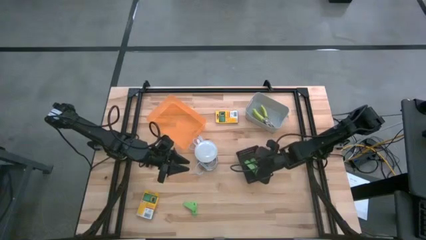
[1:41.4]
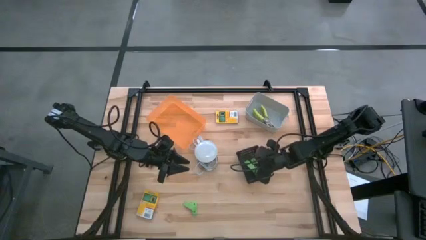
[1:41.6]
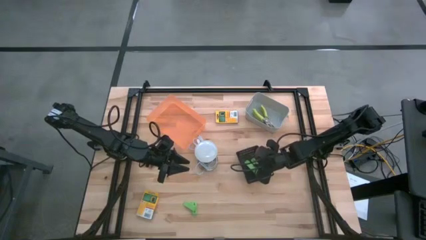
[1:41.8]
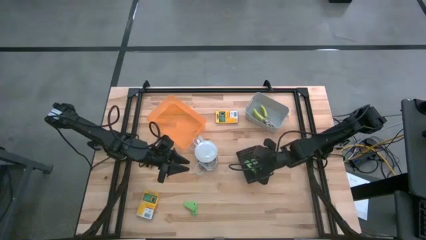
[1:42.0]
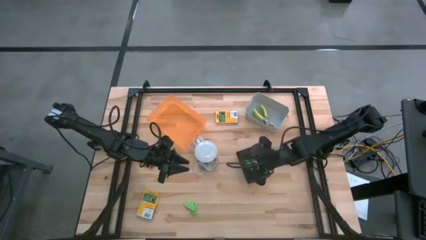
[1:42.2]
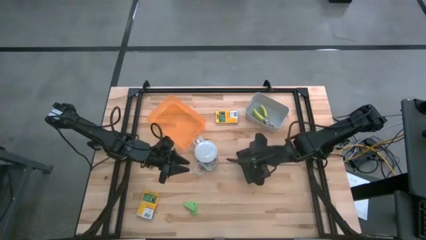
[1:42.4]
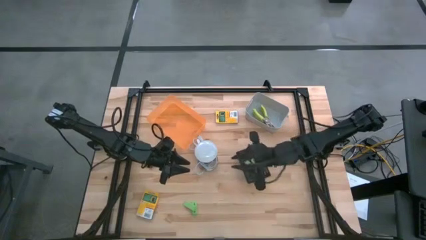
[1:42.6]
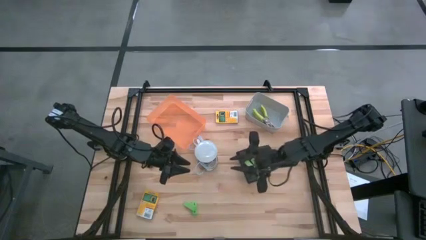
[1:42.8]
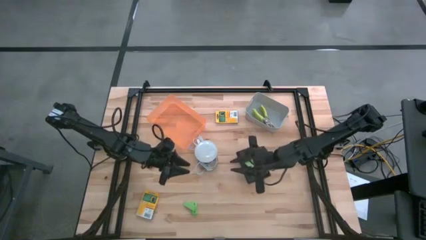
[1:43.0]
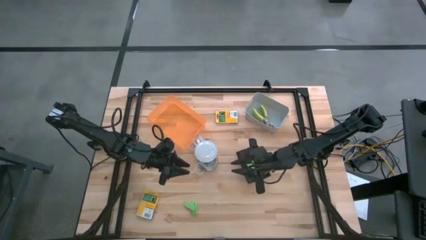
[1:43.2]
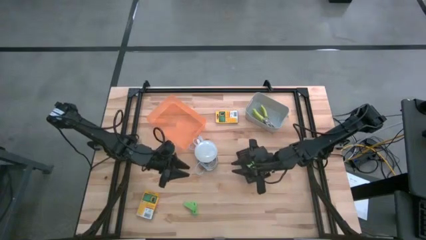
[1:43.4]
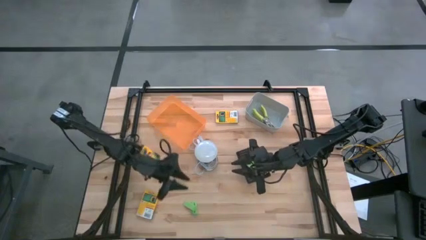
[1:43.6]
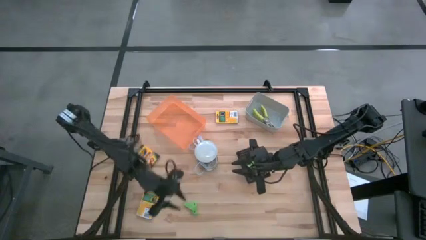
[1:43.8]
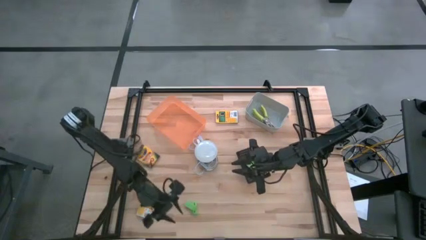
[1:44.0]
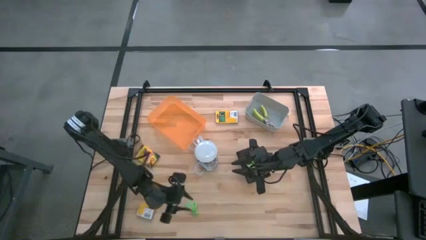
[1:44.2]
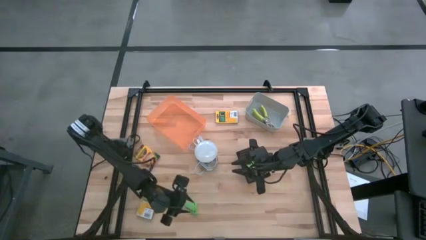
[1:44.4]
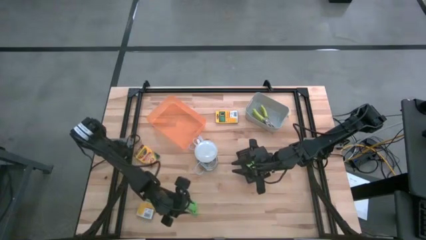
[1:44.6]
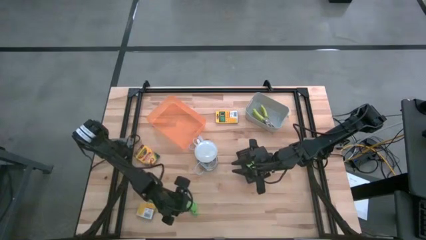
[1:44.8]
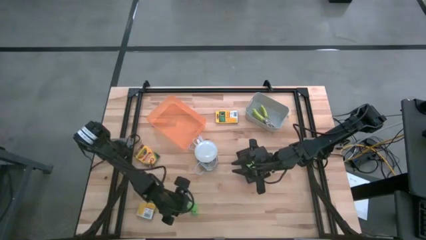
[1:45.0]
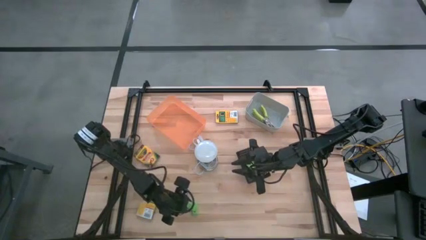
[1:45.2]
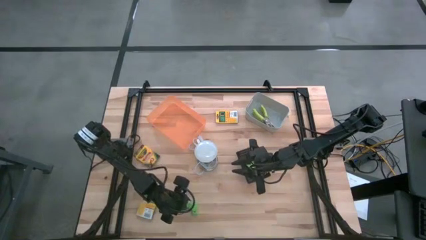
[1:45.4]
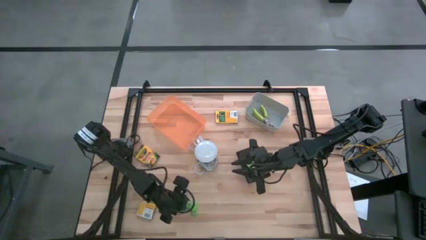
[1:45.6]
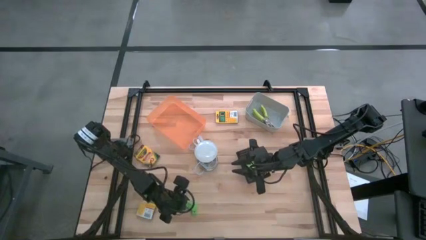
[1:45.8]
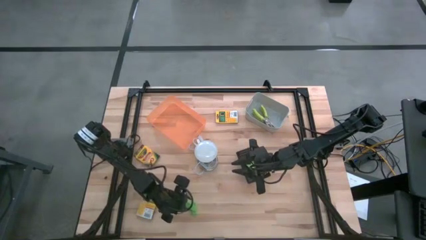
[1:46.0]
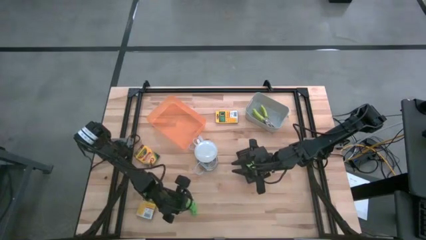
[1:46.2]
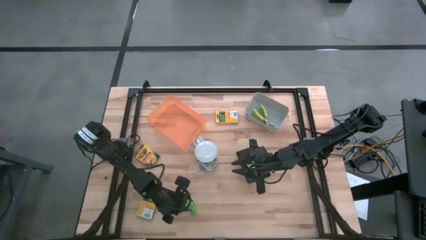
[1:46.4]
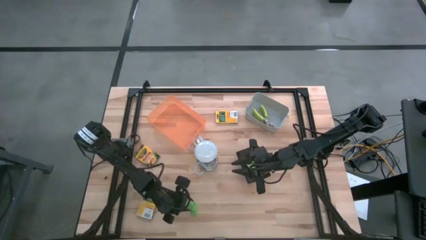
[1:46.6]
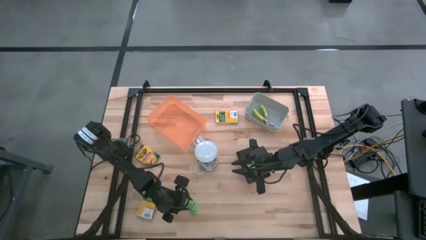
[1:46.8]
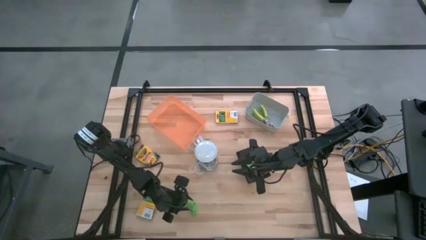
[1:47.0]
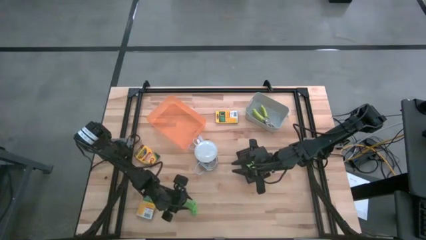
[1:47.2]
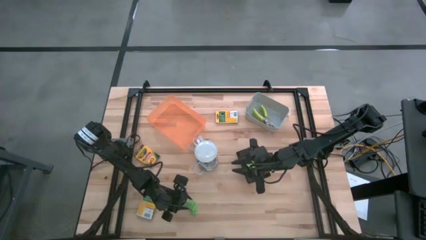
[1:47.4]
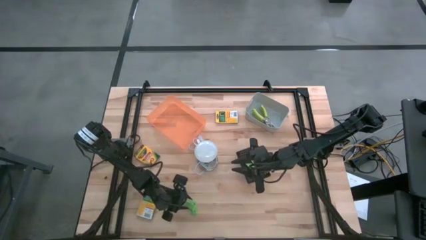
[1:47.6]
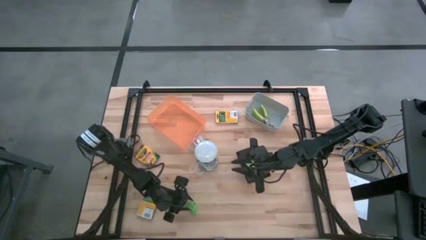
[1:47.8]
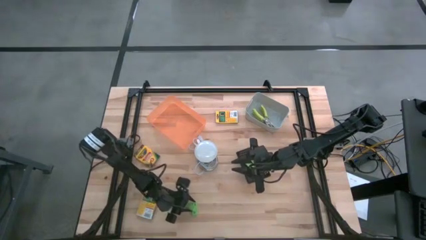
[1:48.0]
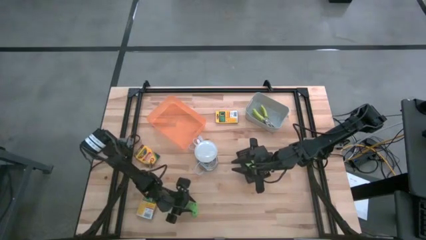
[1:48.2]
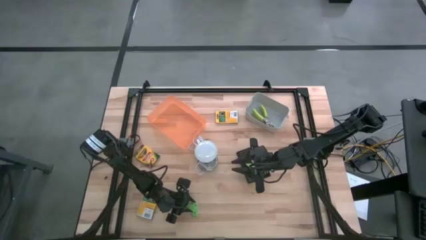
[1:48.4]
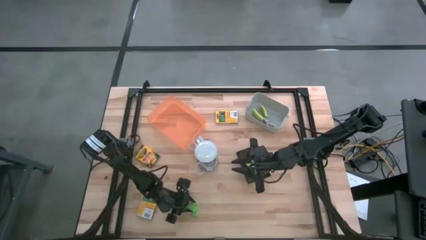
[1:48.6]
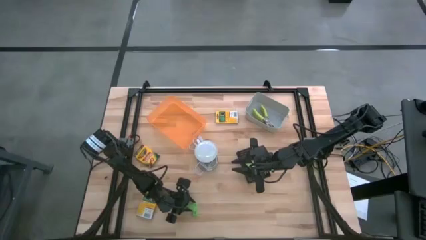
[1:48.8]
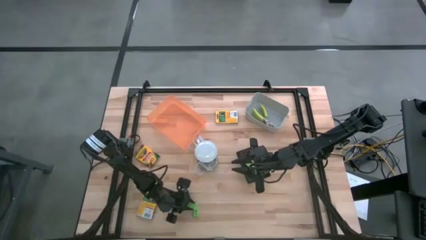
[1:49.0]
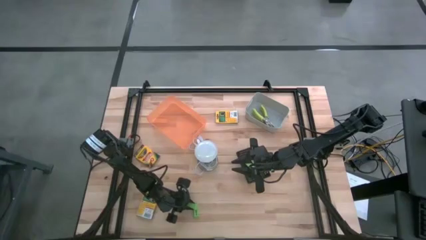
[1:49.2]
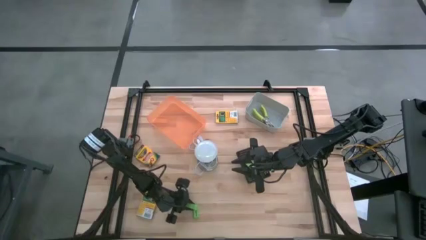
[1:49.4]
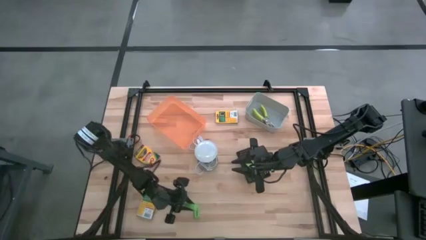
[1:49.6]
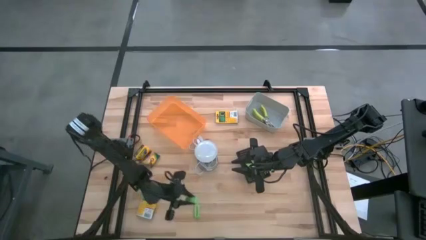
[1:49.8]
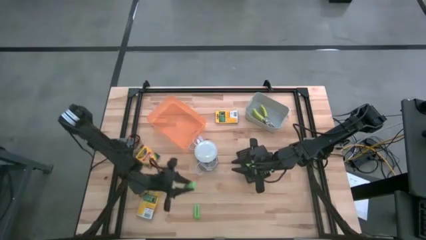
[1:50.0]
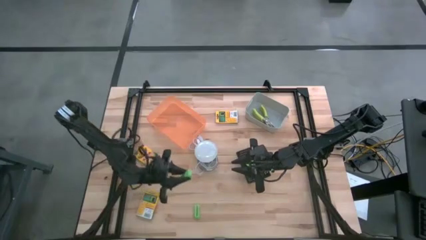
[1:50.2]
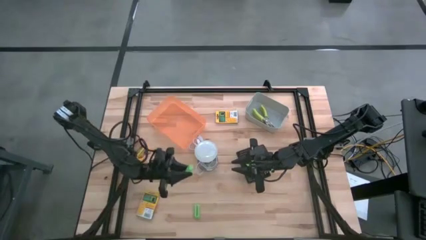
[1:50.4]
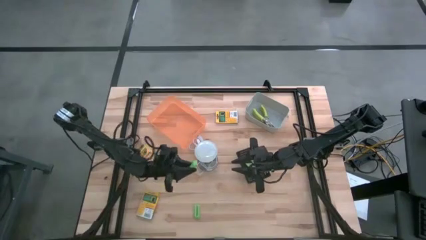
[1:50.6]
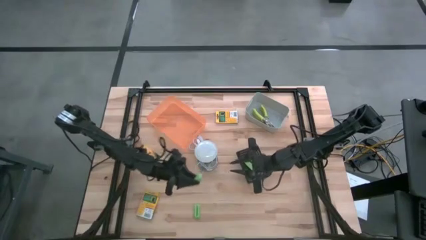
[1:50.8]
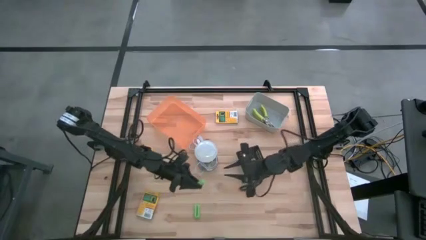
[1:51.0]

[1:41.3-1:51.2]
Task: Pick & Place School Supplies
Put the green eraser into the black bin

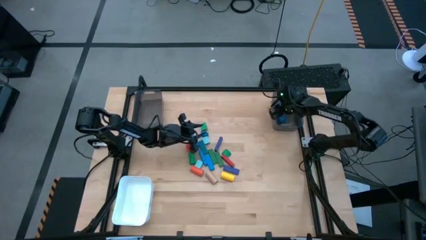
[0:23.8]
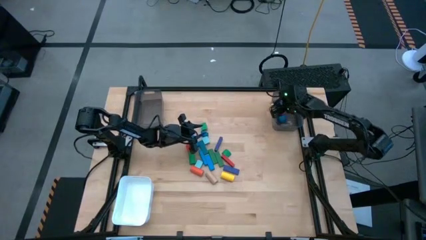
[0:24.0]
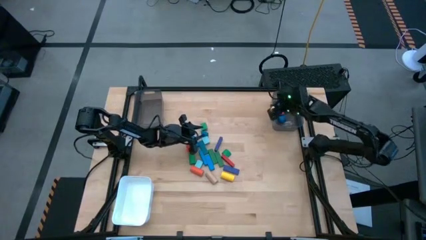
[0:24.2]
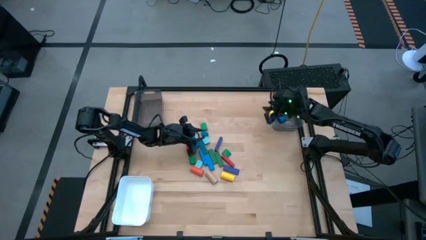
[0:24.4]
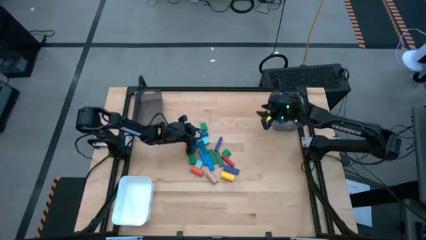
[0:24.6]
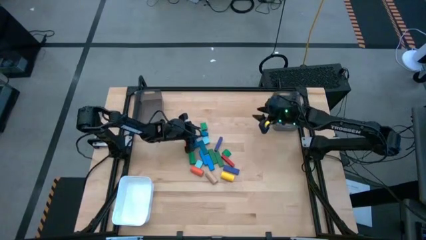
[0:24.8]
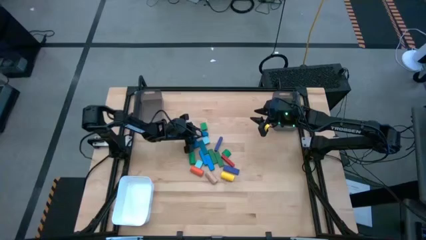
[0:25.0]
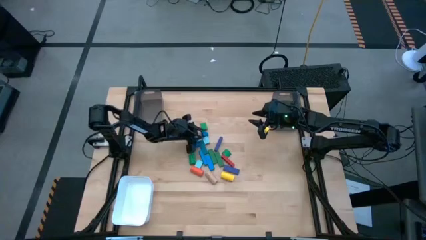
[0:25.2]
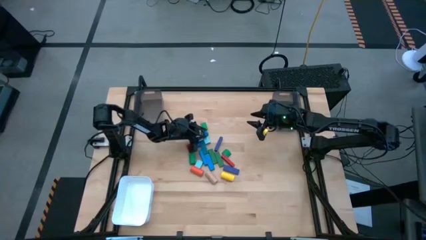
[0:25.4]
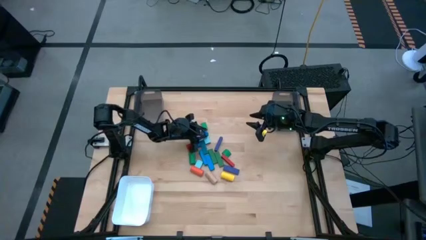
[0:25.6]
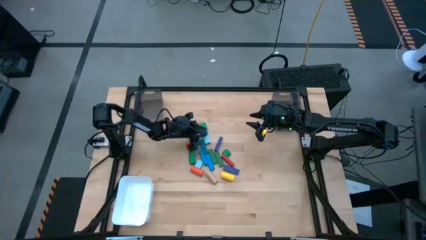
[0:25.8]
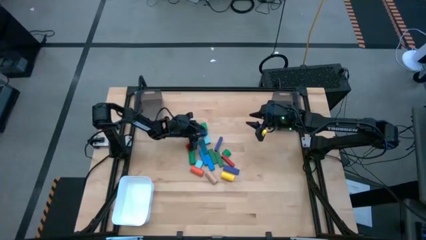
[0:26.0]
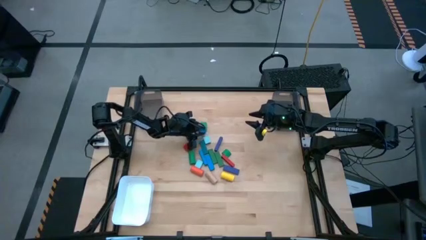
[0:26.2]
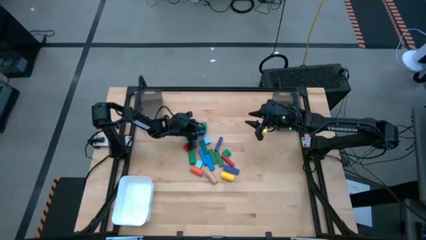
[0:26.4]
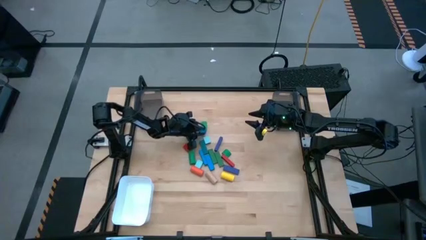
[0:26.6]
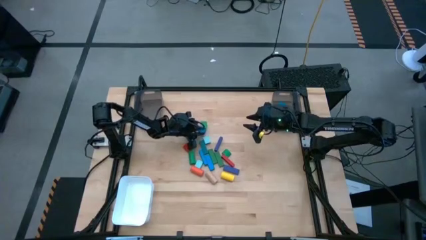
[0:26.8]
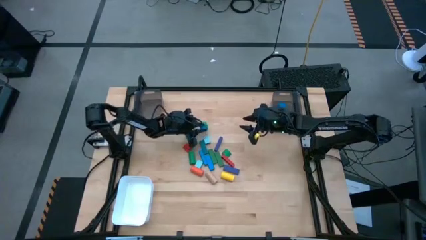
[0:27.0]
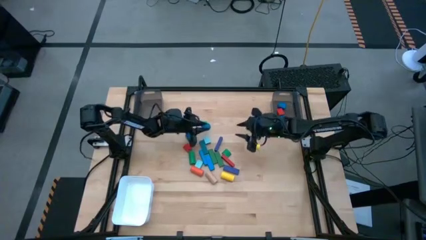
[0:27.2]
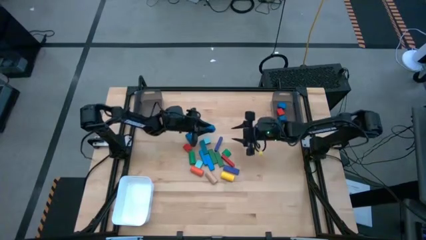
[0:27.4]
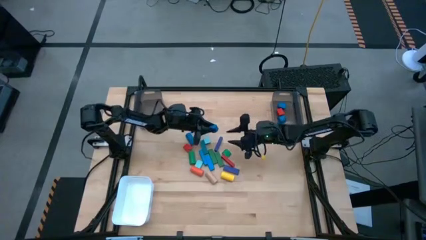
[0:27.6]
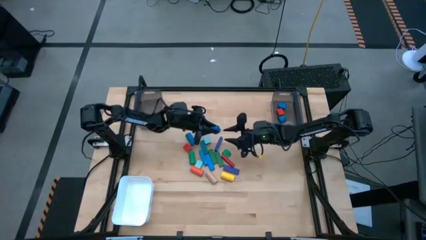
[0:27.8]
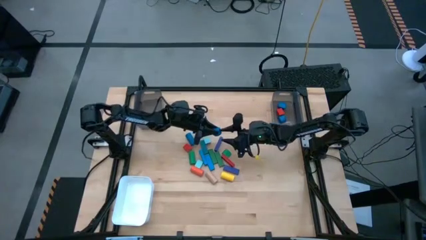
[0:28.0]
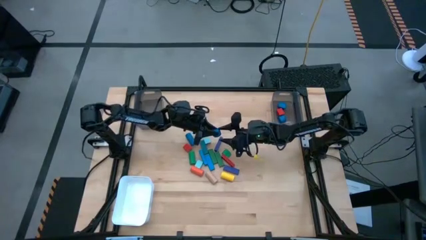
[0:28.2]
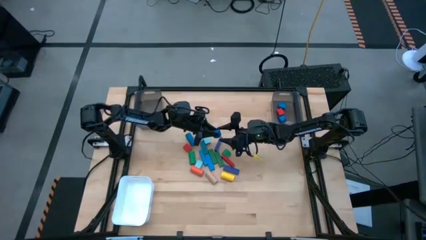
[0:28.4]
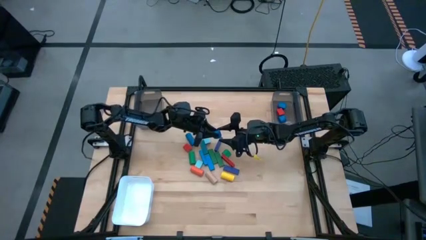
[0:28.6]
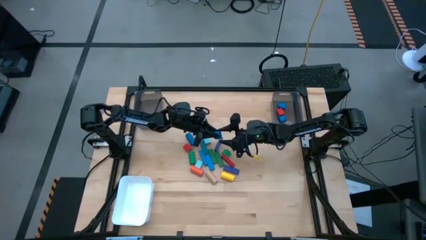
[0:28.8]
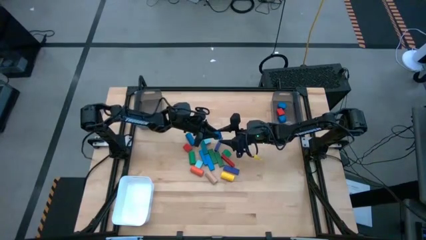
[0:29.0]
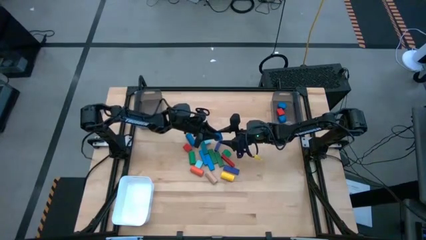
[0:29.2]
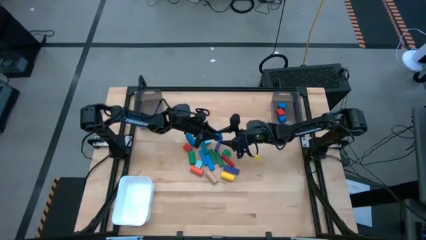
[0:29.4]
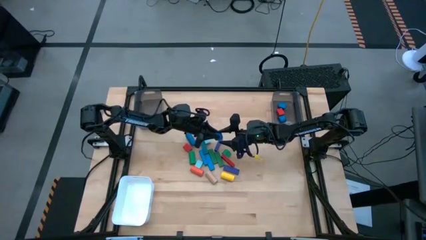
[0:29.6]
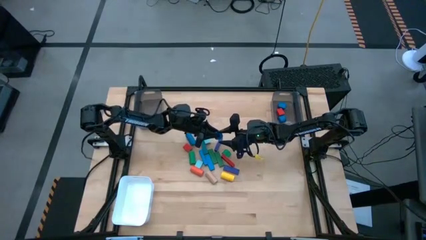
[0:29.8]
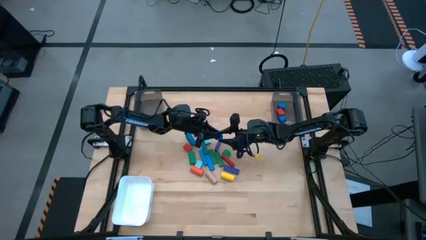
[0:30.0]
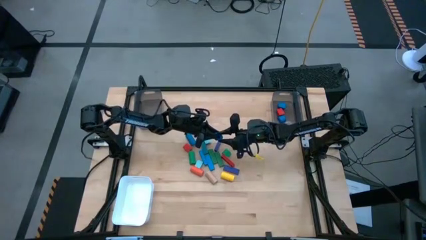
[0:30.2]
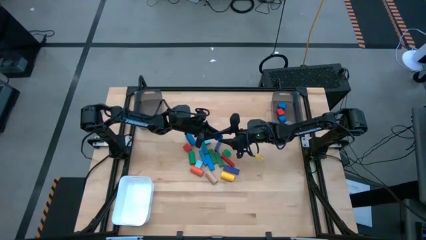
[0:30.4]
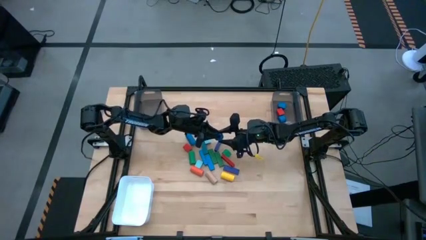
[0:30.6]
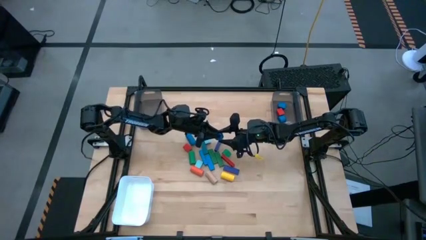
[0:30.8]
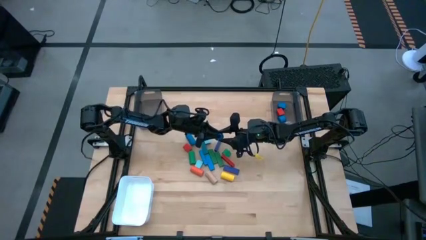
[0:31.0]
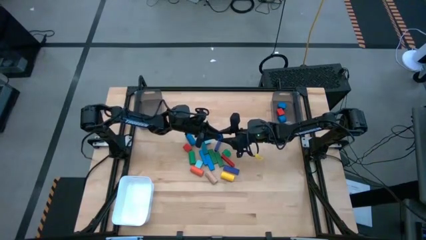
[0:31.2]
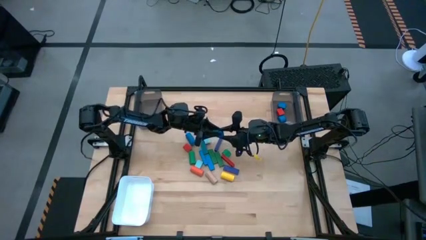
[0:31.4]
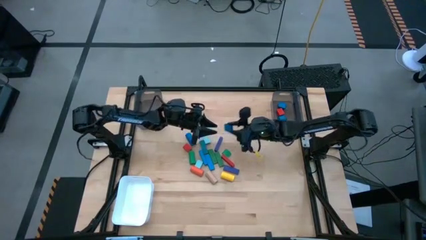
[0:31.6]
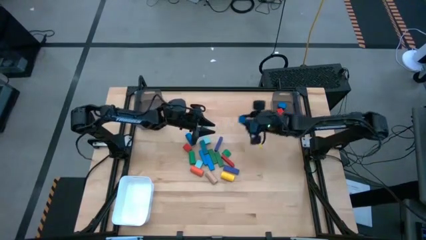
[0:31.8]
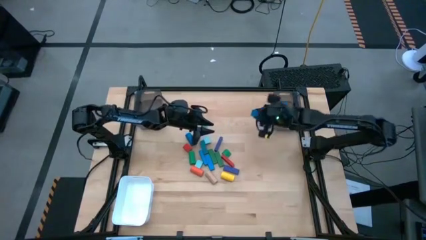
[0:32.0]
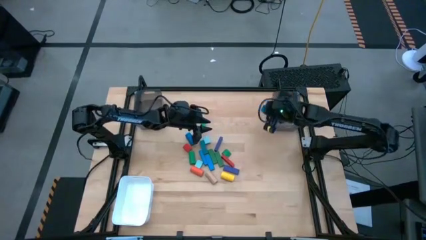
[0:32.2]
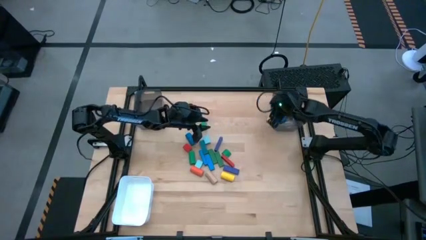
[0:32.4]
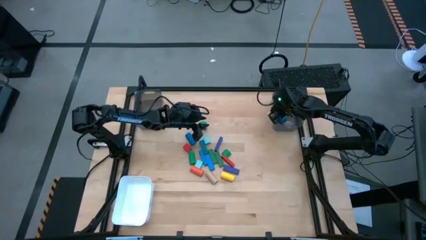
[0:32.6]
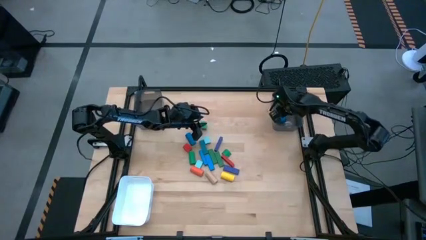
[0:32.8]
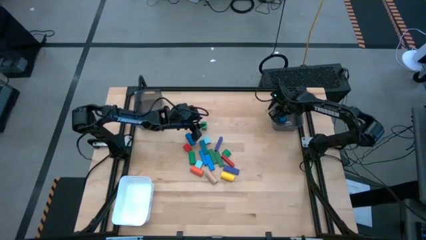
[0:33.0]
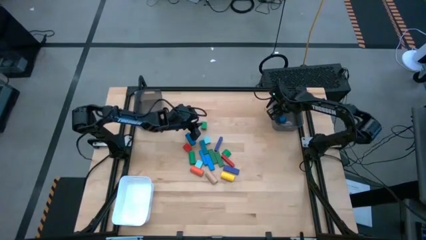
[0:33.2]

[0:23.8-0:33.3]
Task: Sort blocks by size
Put the blue half circle block into the right black bin
